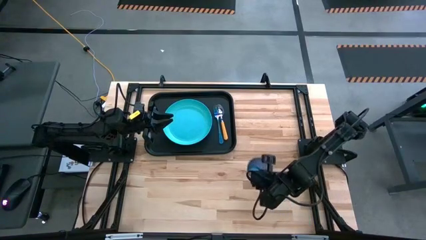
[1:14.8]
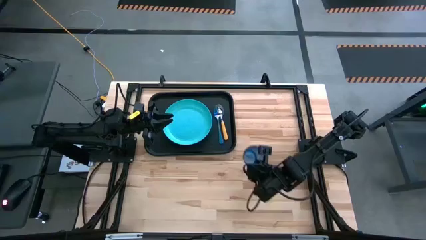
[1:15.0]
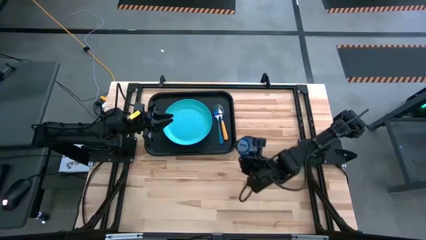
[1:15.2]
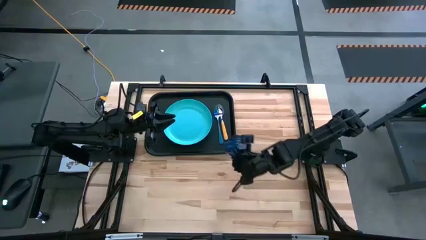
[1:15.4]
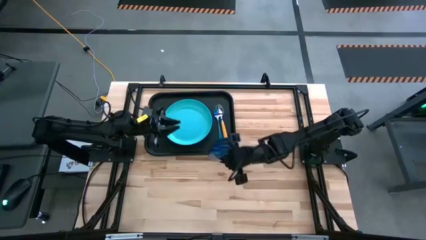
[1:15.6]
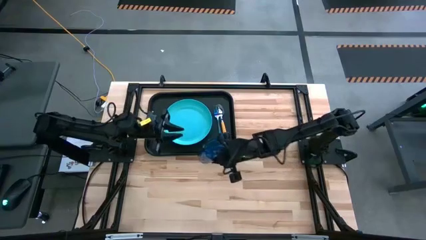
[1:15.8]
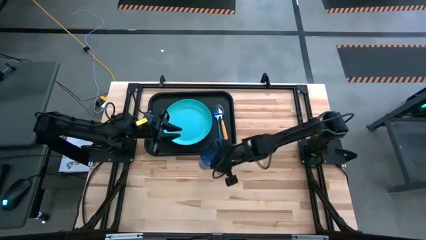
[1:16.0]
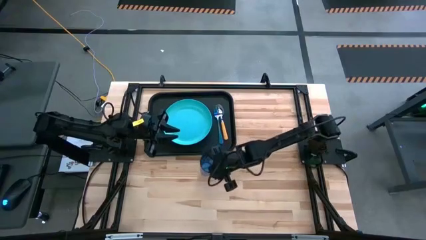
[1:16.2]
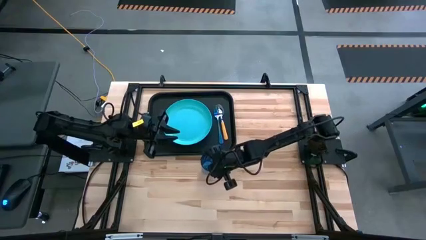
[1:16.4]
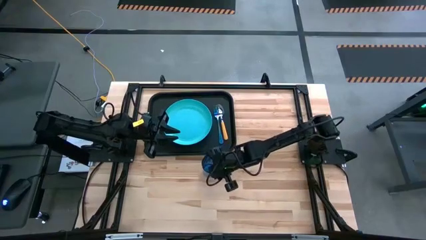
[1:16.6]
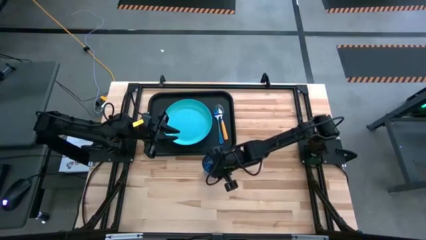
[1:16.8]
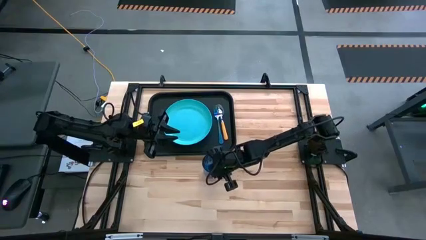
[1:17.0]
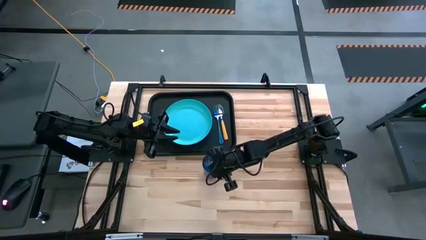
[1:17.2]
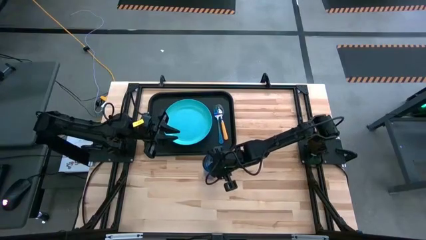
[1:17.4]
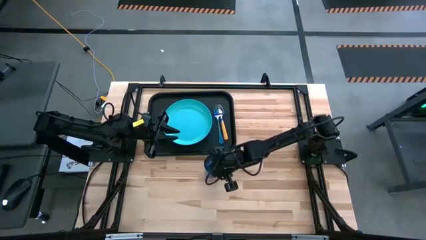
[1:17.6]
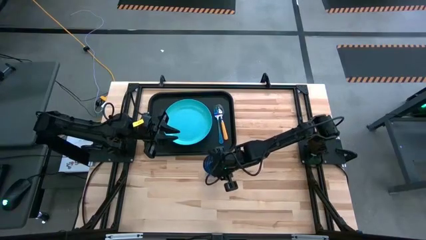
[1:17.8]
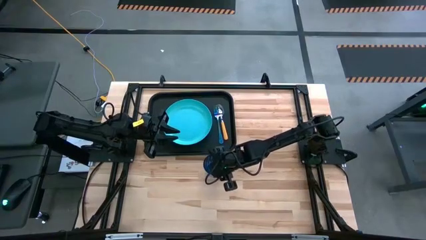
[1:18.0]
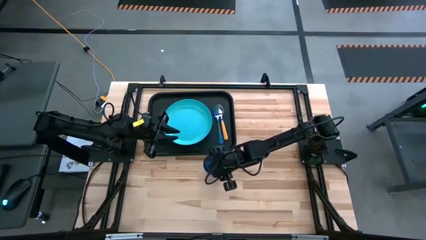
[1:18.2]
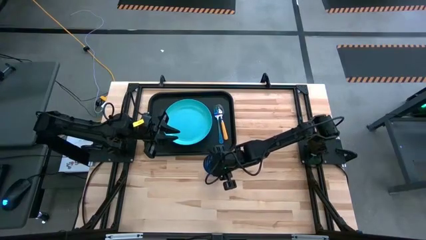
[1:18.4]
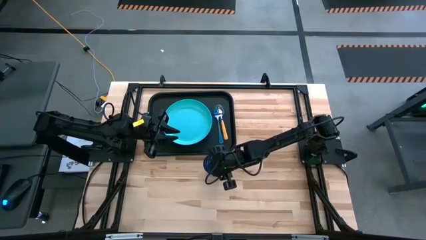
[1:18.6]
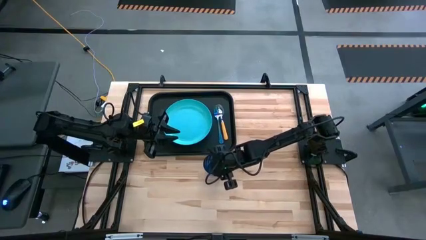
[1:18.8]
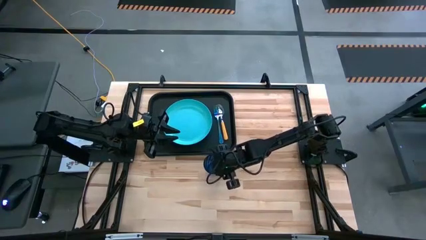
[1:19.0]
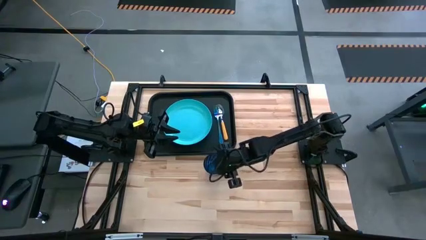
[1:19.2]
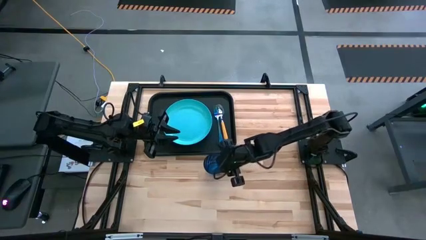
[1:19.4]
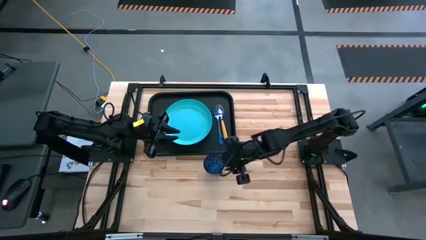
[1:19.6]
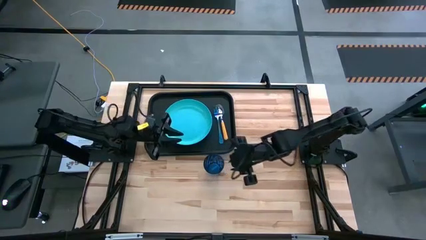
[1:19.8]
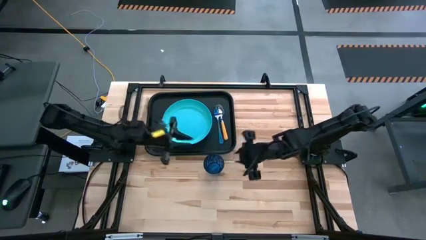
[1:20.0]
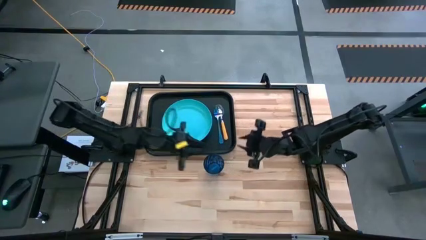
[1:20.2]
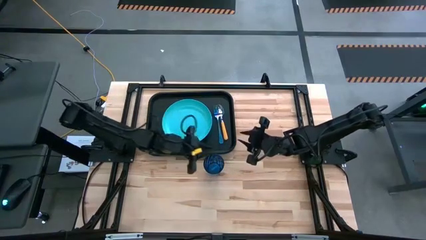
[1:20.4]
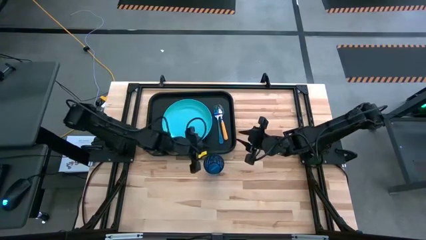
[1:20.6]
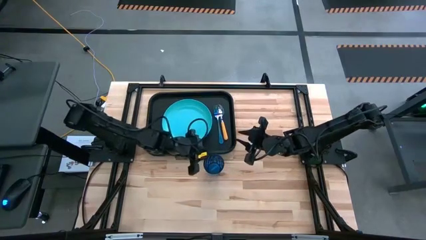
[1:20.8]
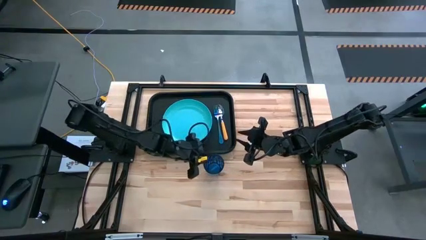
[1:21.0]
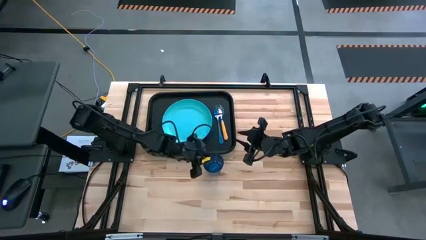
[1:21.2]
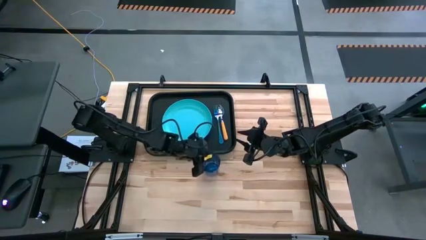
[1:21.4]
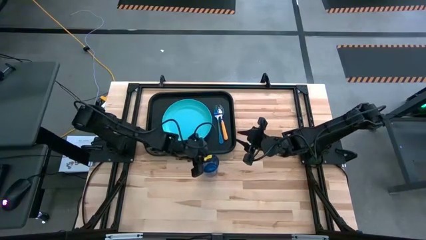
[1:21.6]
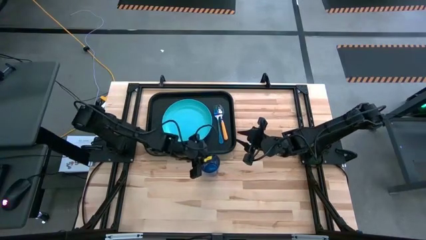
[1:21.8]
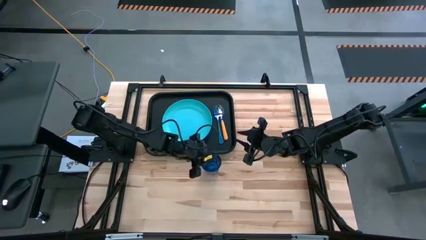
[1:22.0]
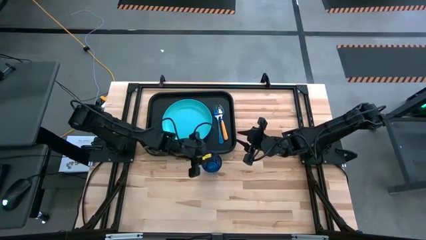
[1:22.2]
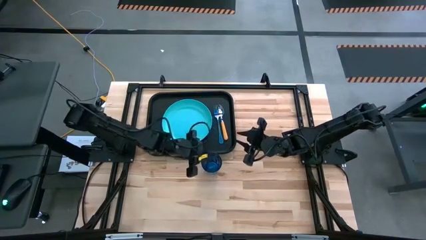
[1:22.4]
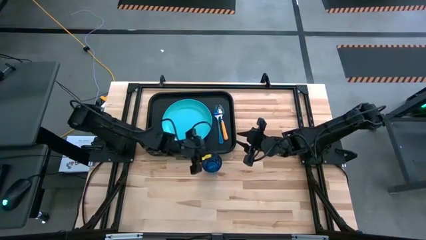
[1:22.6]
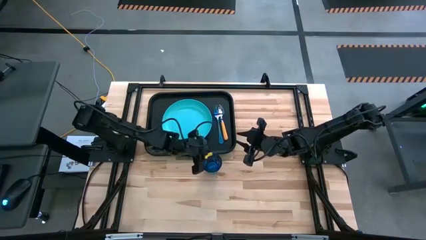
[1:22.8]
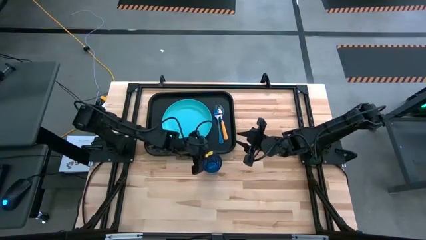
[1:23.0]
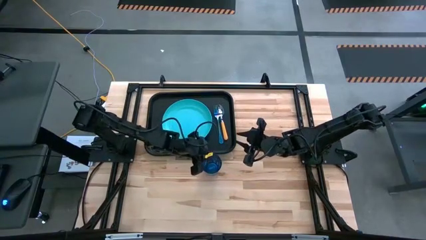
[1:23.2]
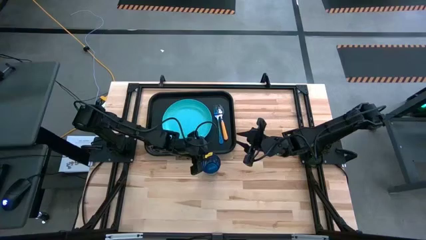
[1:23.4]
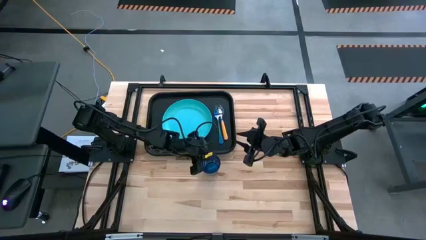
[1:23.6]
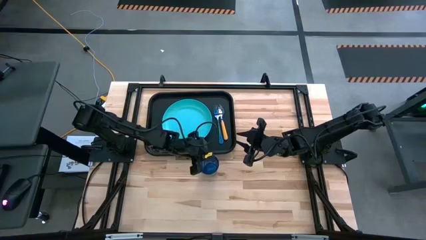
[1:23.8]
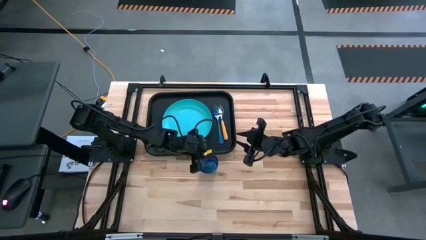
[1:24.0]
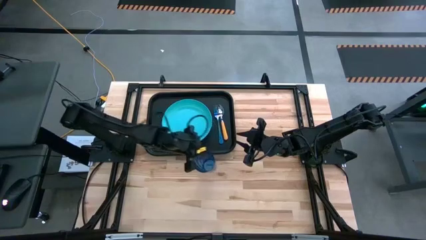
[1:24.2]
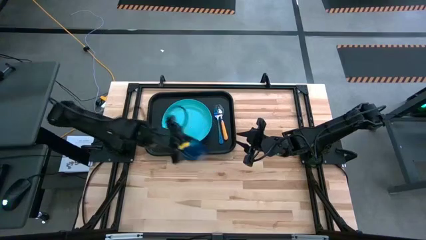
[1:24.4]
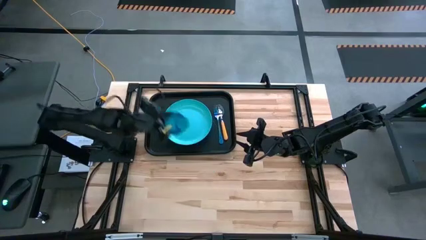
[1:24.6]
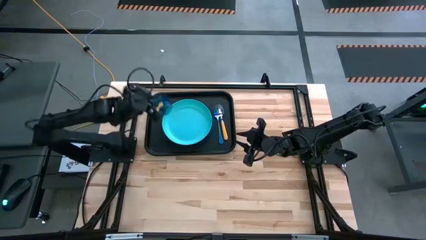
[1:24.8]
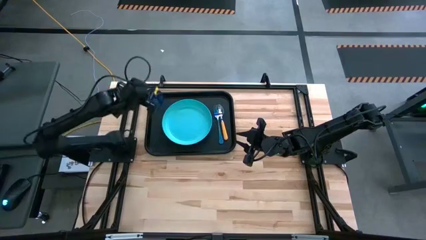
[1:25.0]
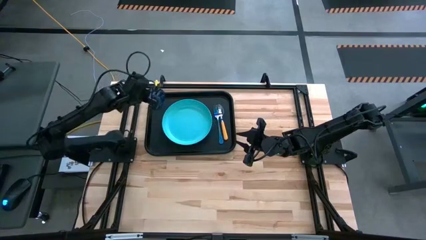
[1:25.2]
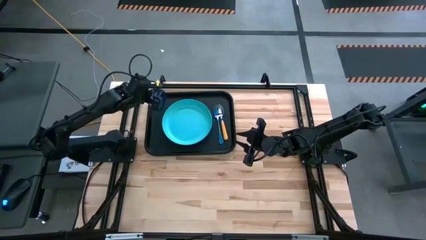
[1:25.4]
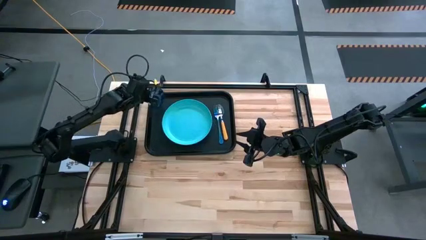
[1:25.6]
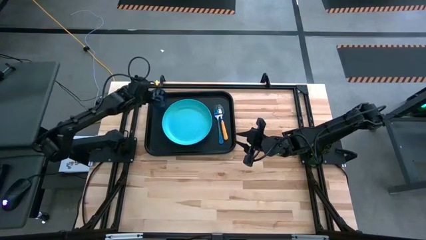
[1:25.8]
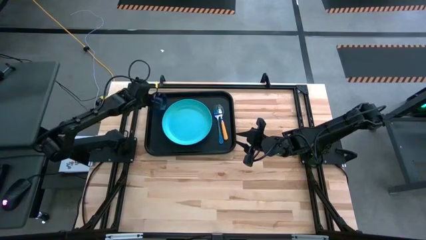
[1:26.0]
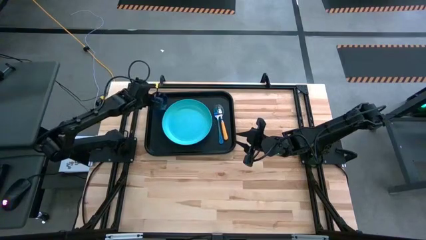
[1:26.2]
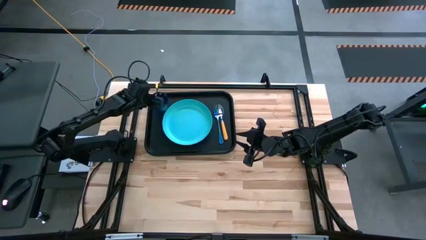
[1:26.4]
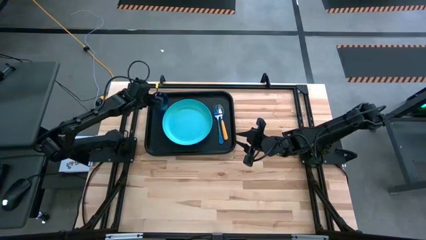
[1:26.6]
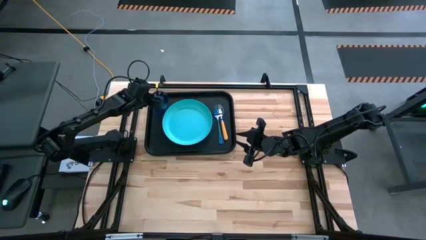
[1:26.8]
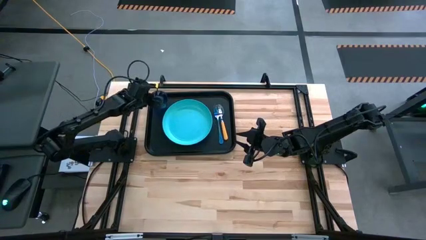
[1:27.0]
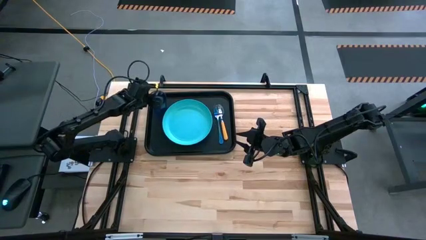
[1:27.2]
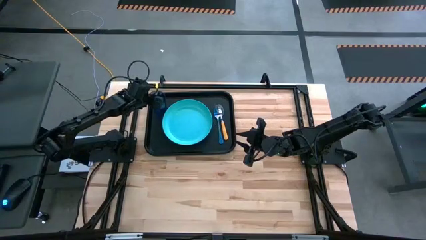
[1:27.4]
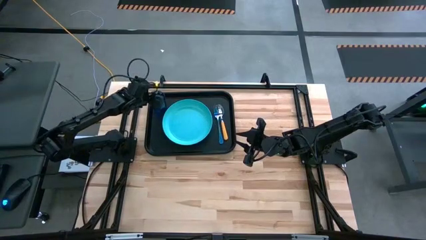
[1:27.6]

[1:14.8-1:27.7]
Task: Pick and place plate/cup/fork/spoon on tray
Put the blue cup on the black serving tray to the top left of the blue plate
